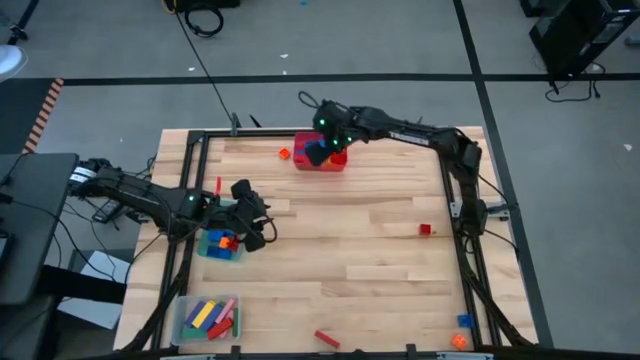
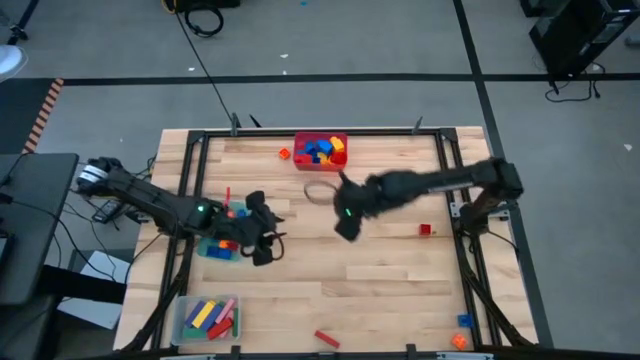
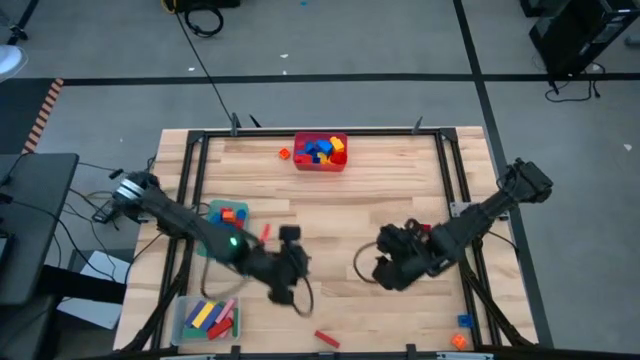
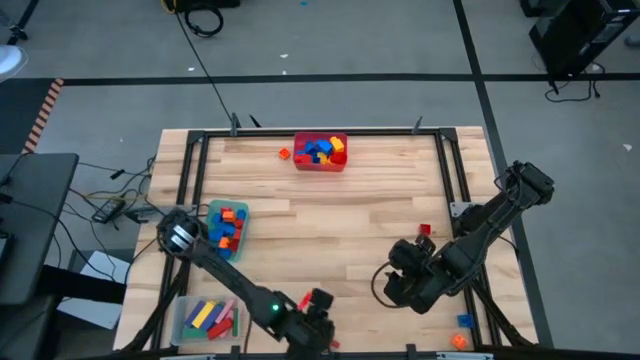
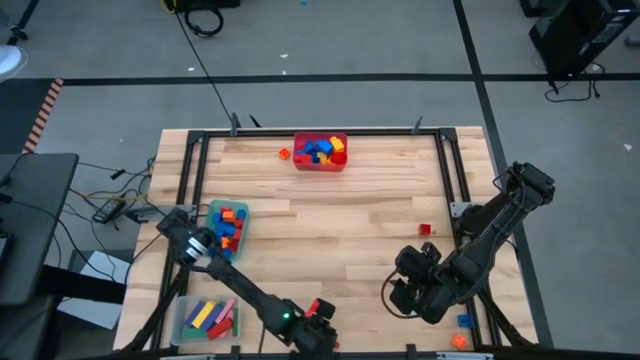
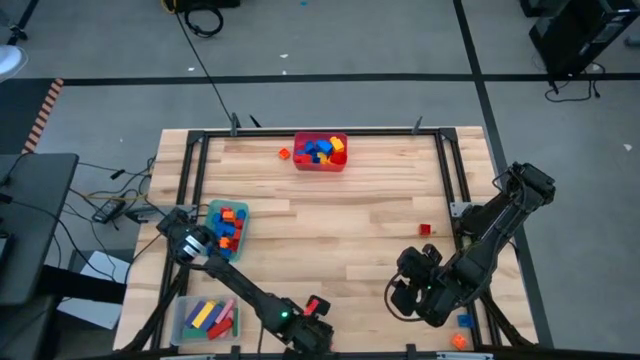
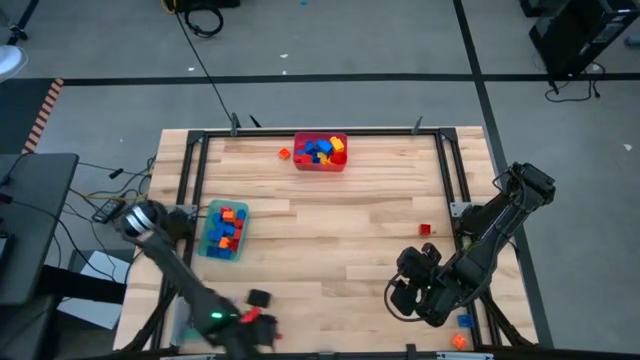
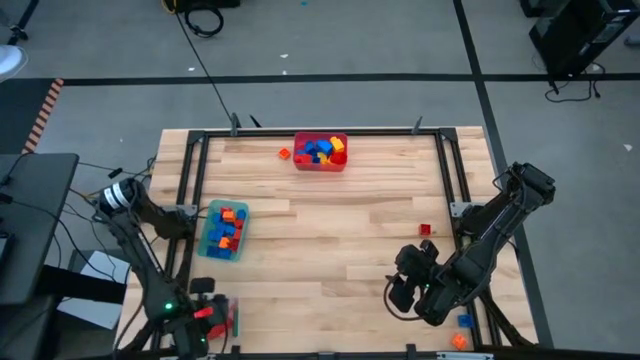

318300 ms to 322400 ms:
Task: Sort blocks by size
Put the red rectangle block into the transparent bin

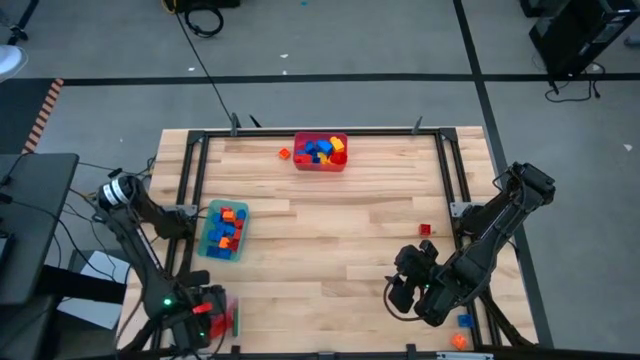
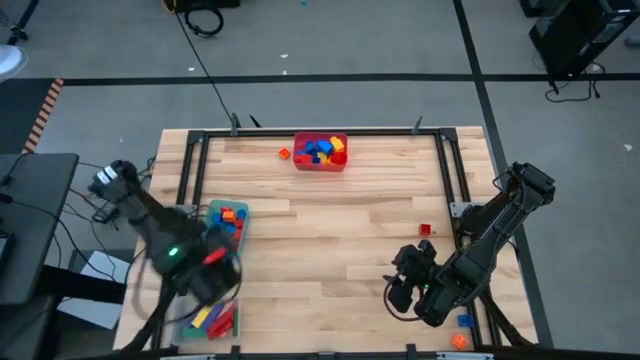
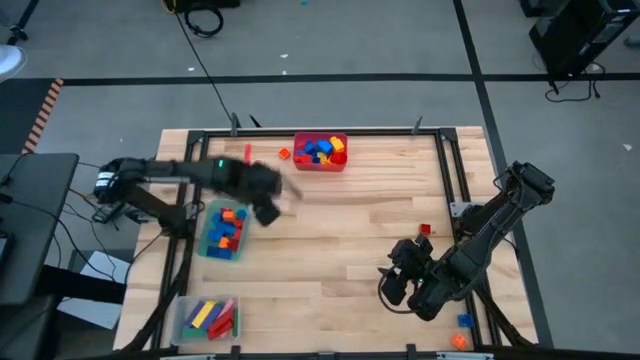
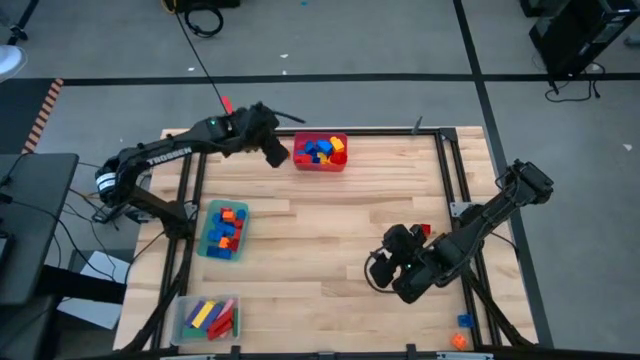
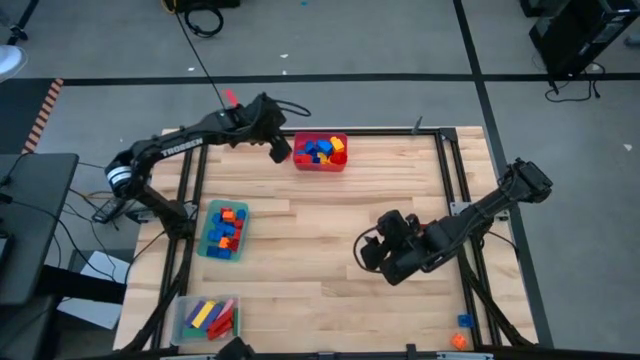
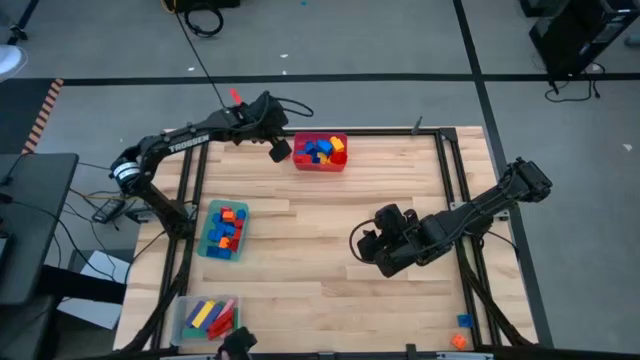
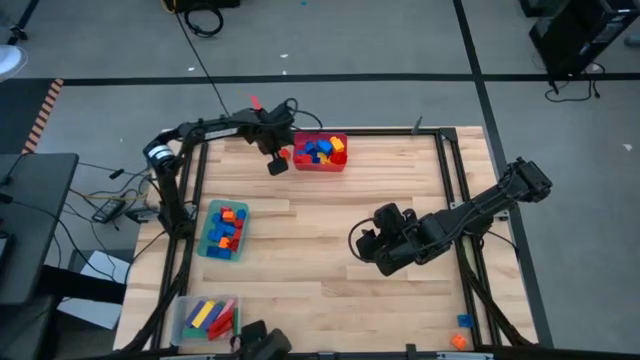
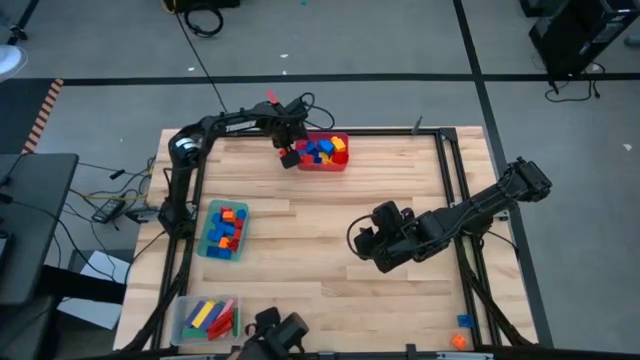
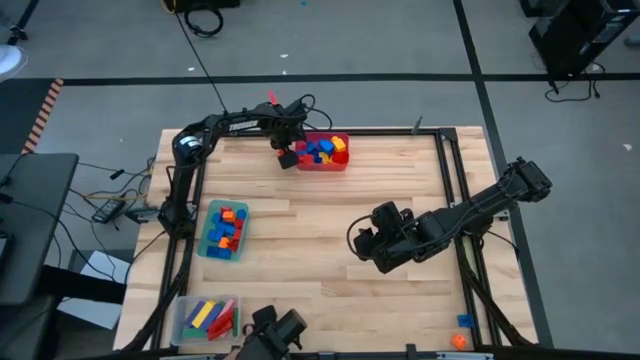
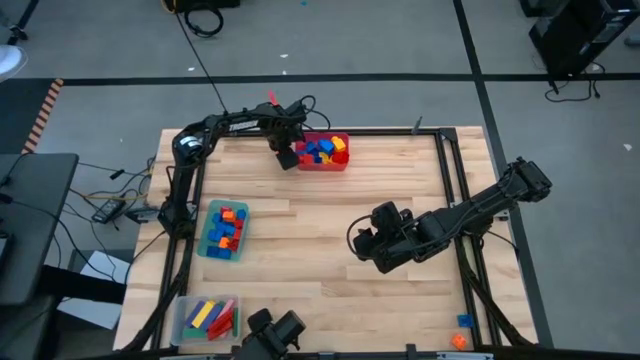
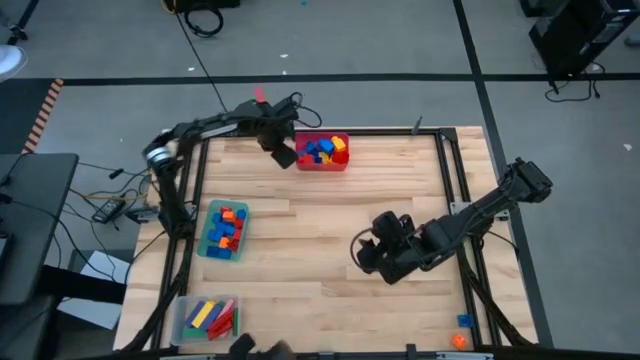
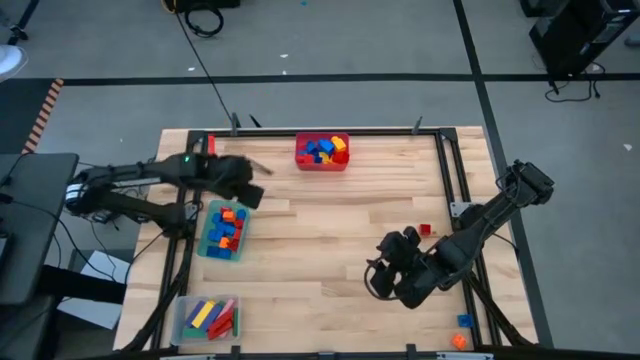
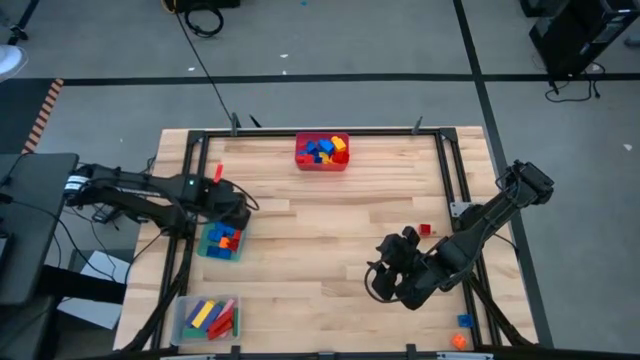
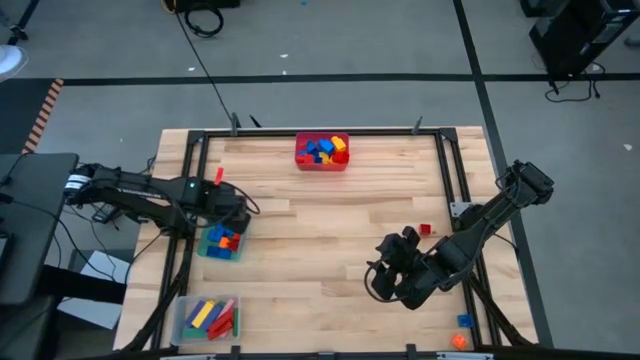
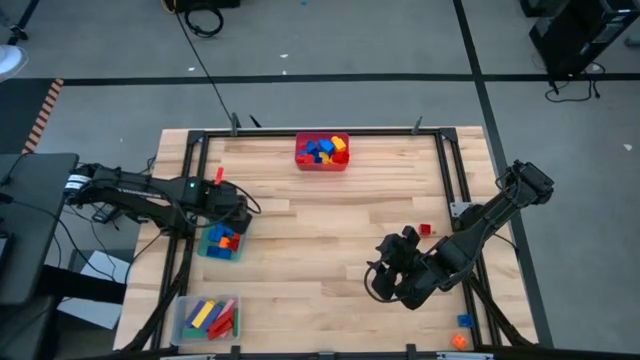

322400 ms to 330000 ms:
Put the orange 4 studded building block into the teal bin

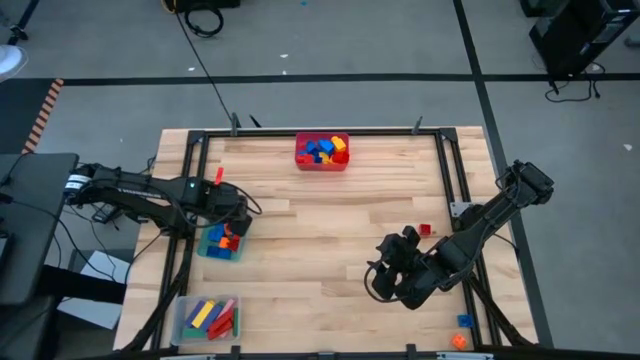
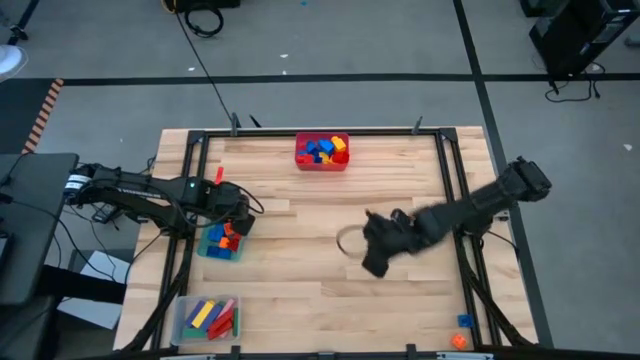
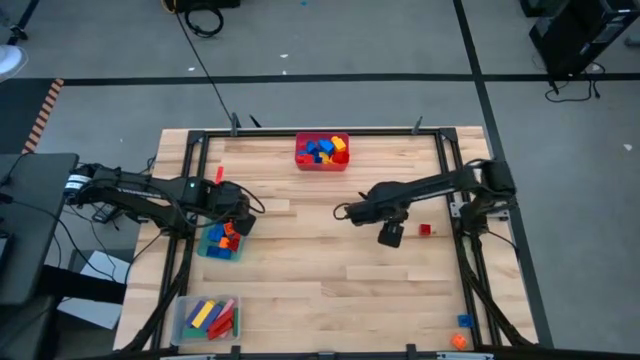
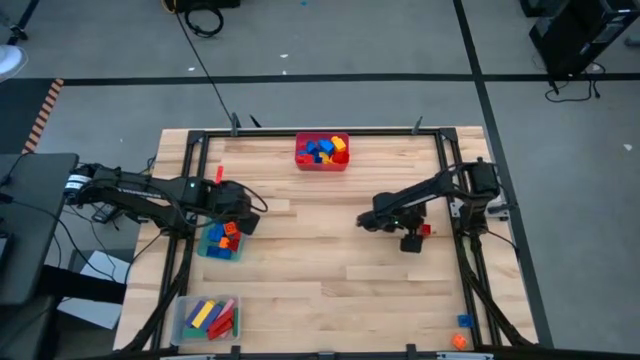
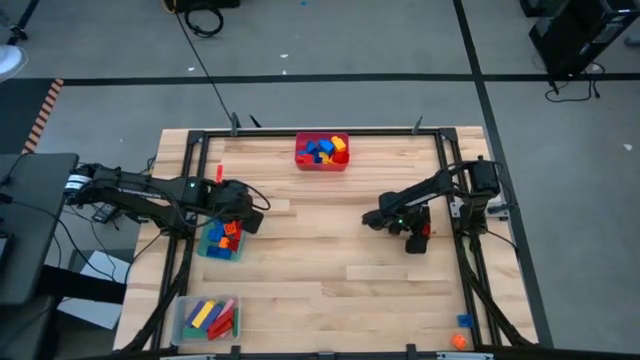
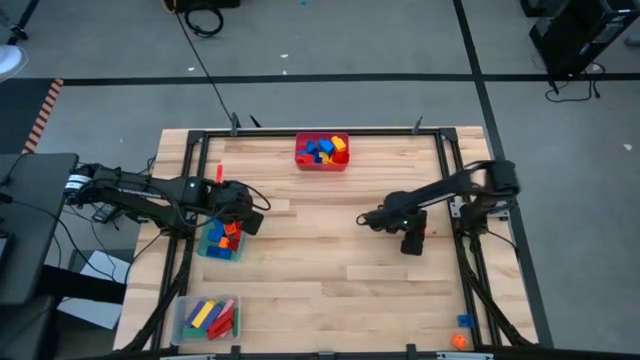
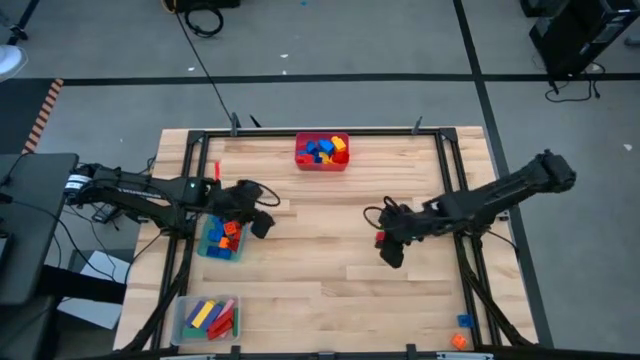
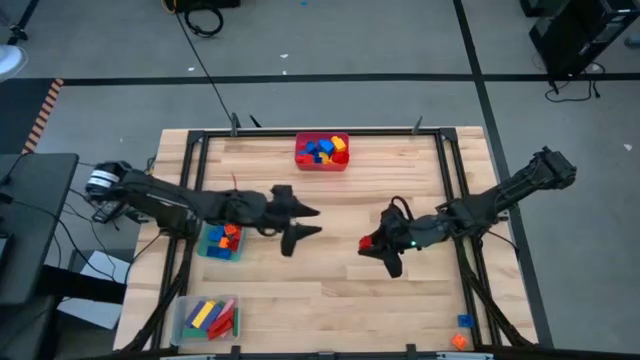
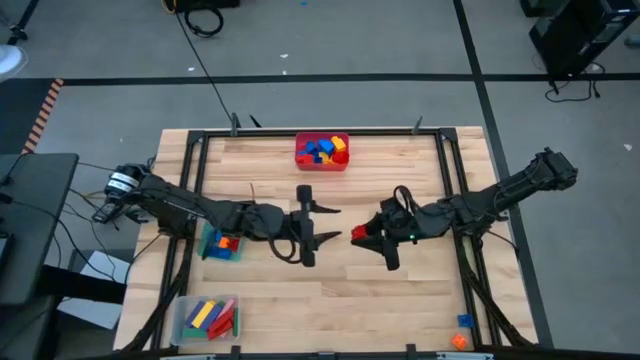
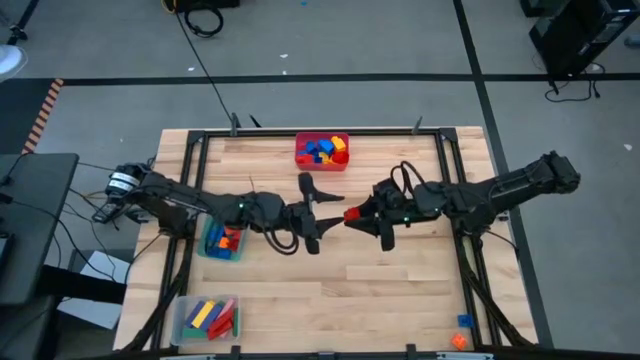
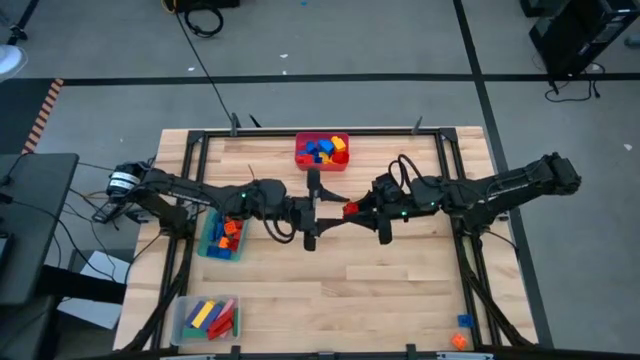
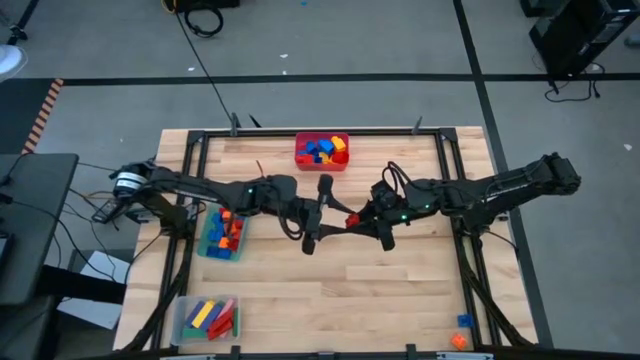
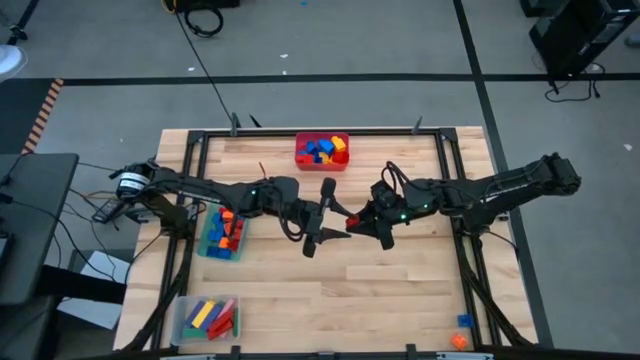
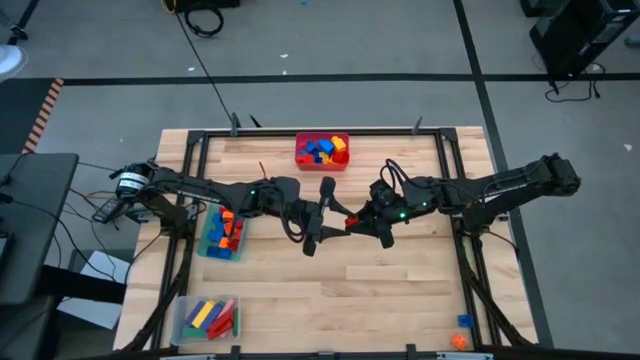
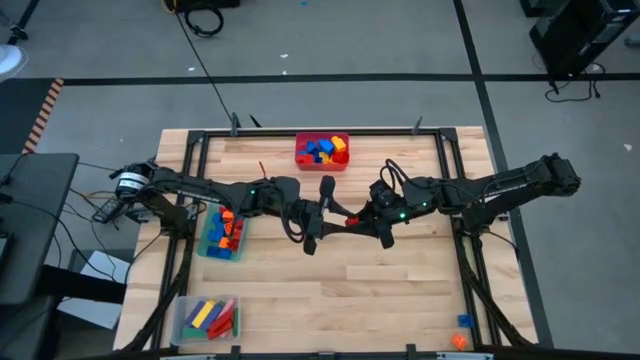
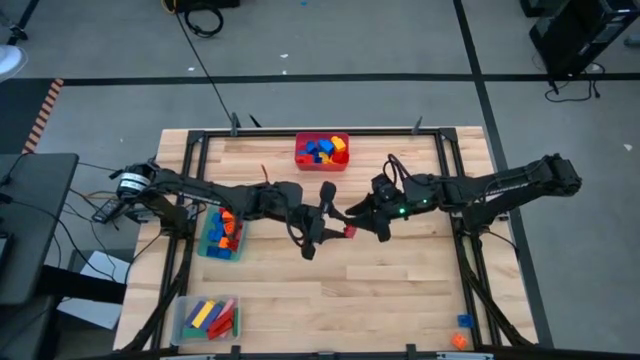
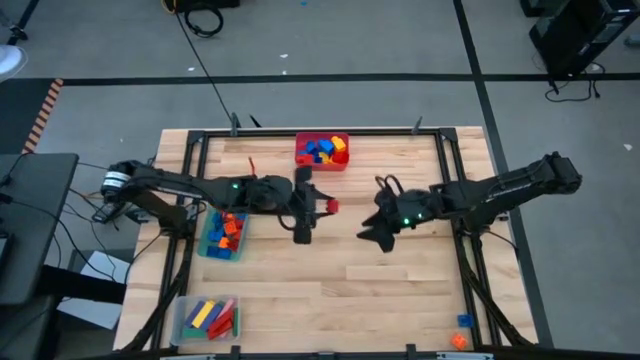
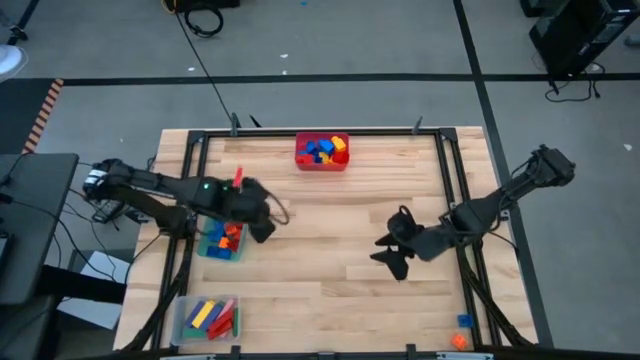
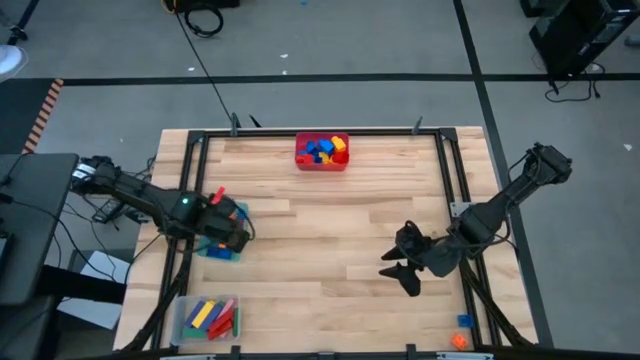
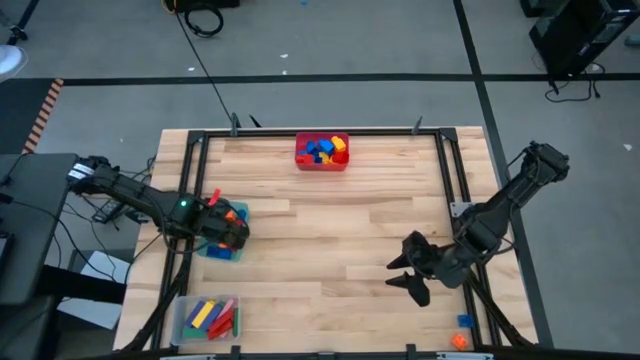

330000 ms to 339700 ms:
Put the red 4 studded building block into the teal bin
